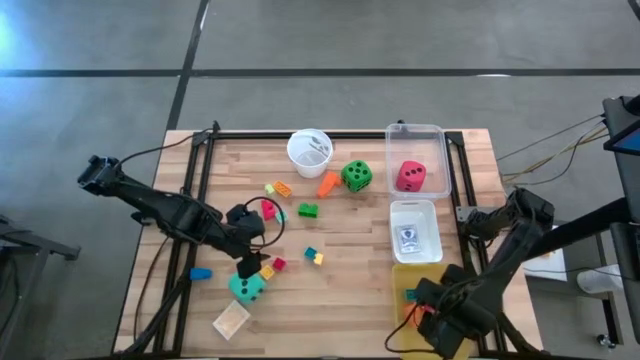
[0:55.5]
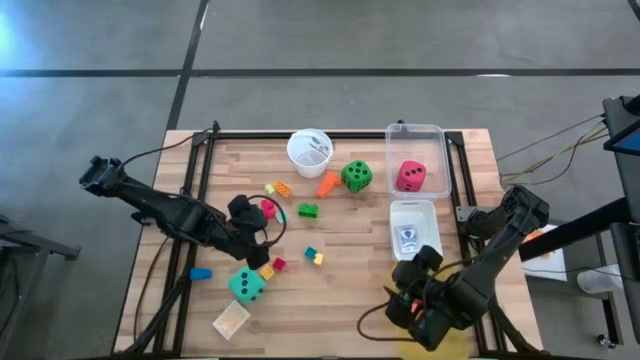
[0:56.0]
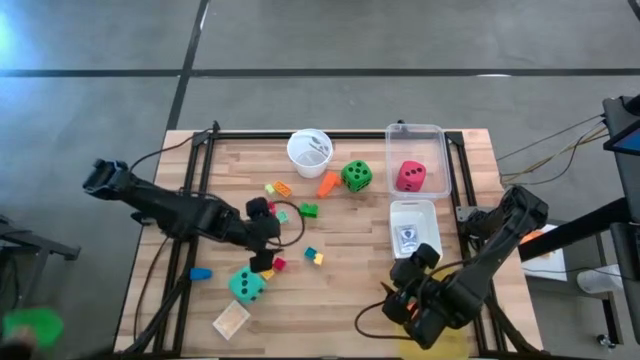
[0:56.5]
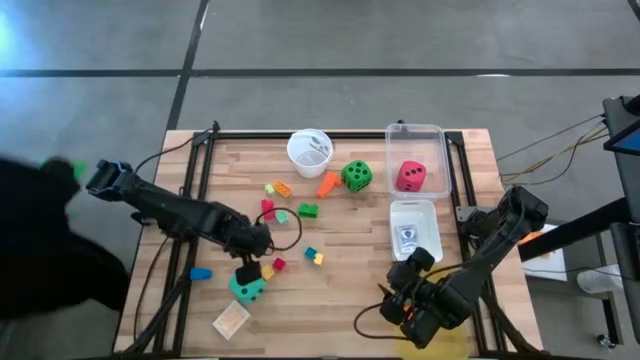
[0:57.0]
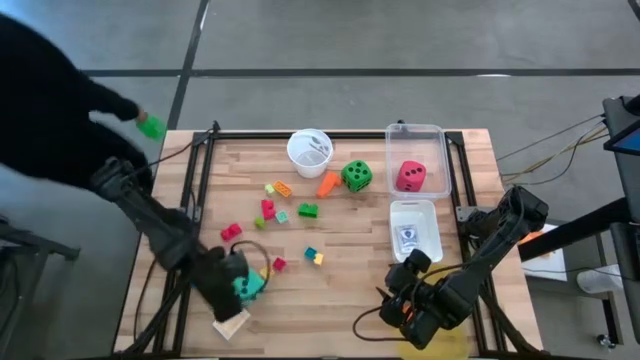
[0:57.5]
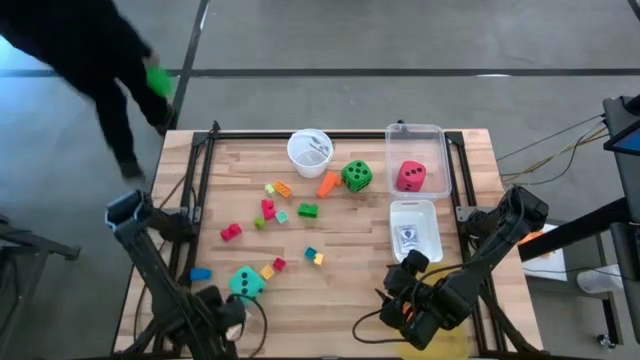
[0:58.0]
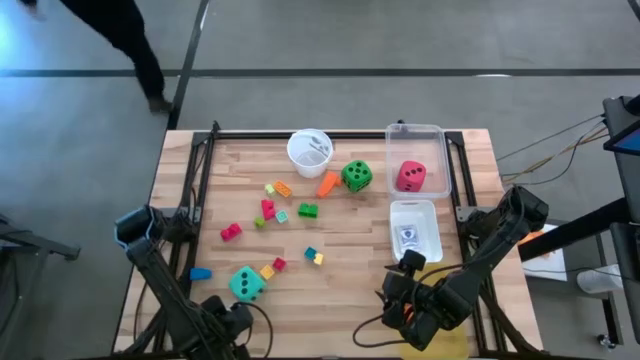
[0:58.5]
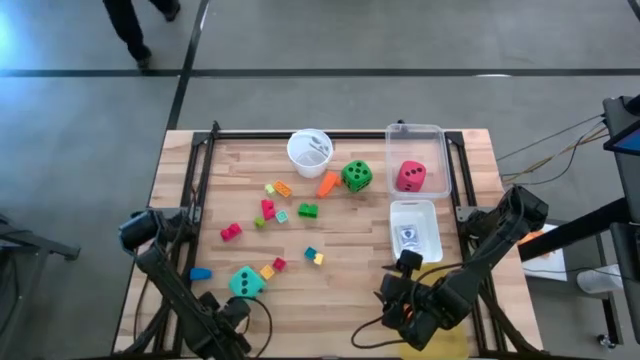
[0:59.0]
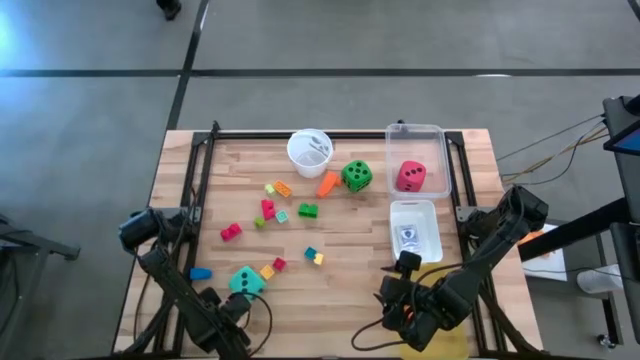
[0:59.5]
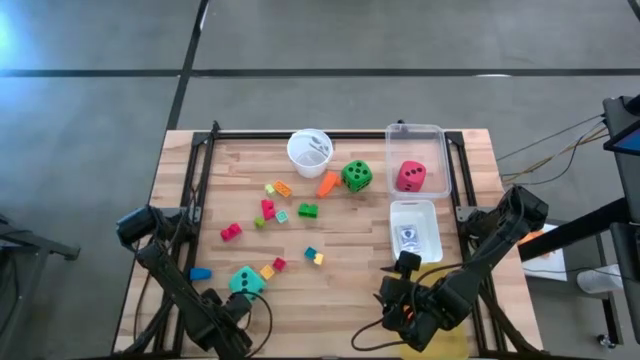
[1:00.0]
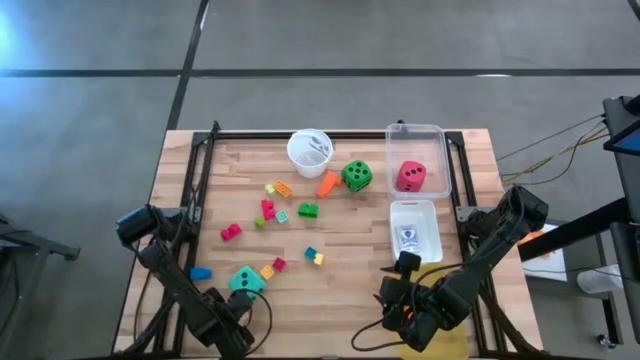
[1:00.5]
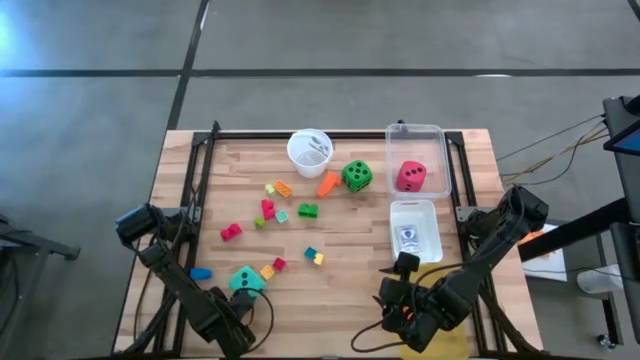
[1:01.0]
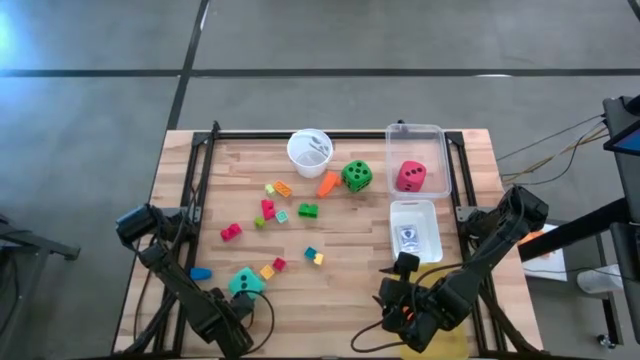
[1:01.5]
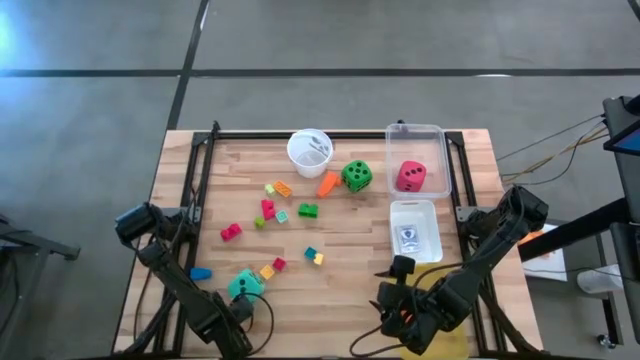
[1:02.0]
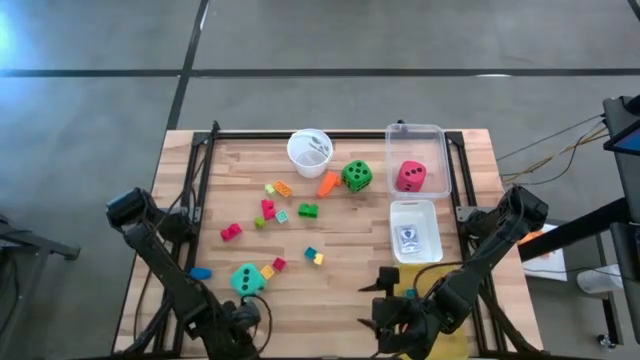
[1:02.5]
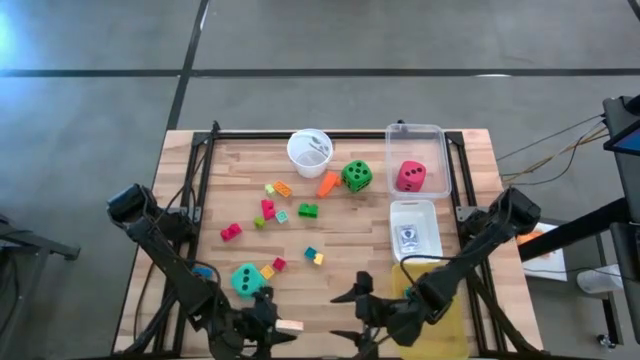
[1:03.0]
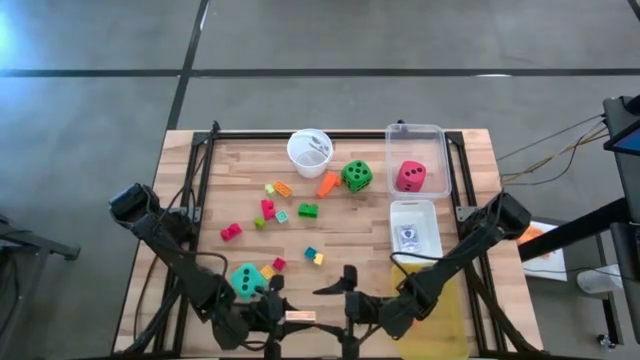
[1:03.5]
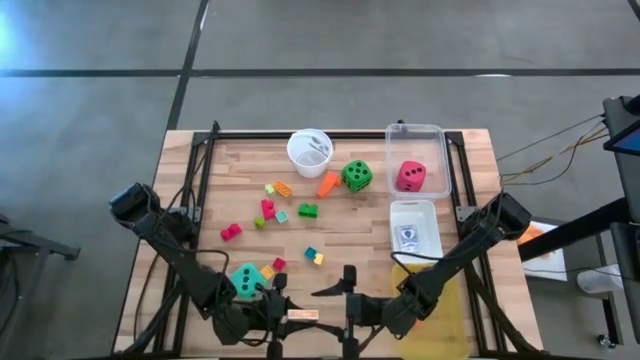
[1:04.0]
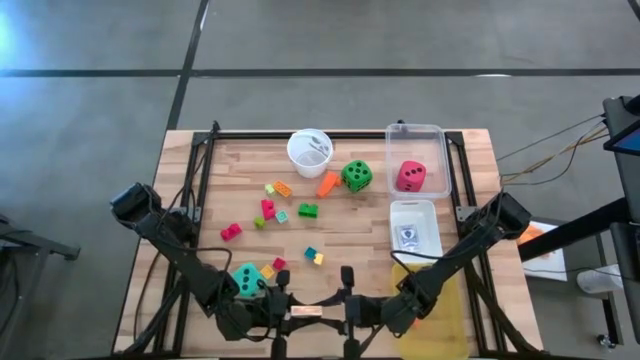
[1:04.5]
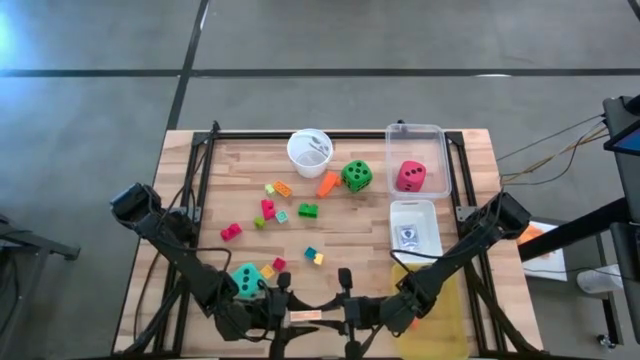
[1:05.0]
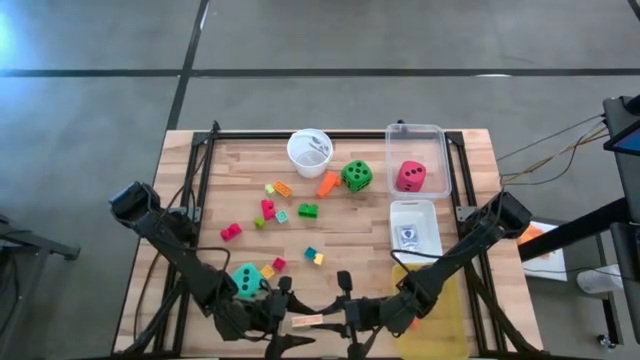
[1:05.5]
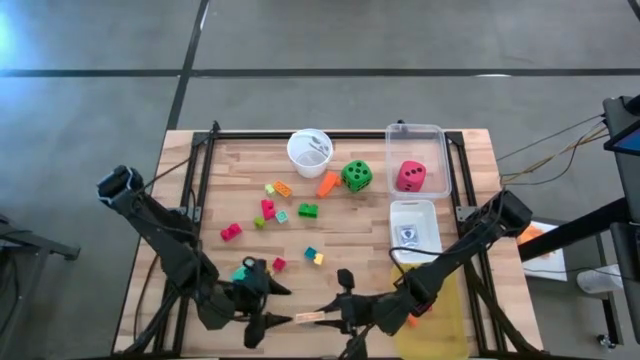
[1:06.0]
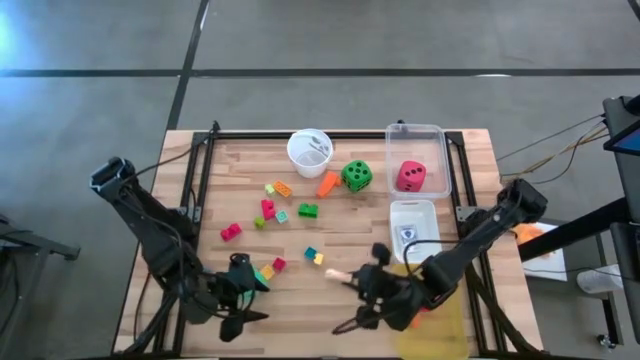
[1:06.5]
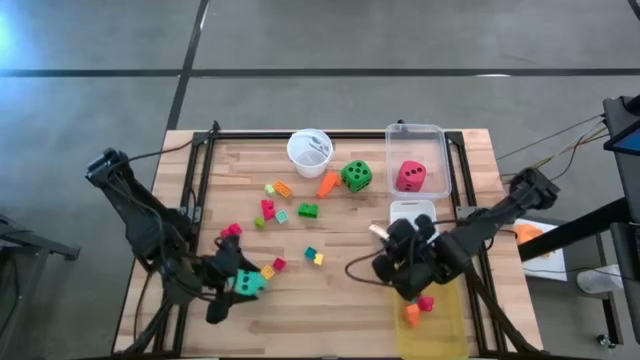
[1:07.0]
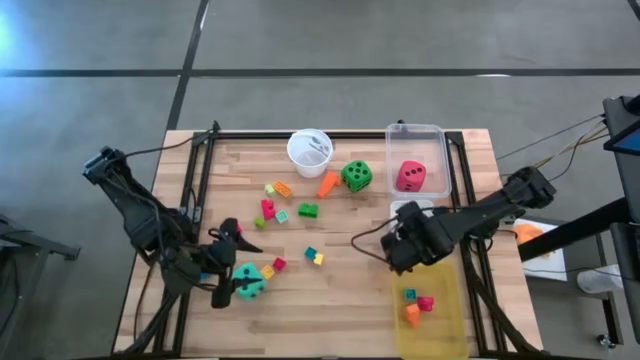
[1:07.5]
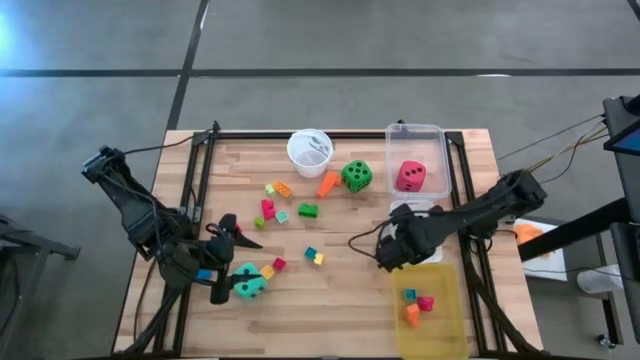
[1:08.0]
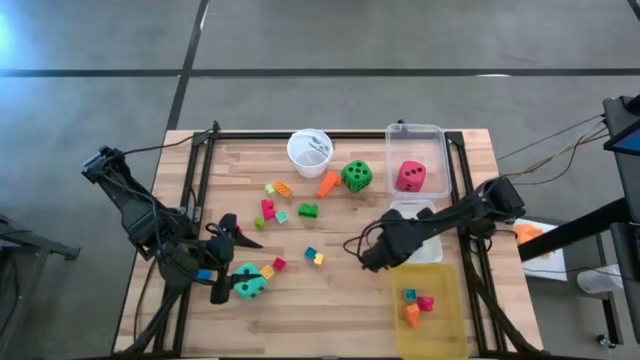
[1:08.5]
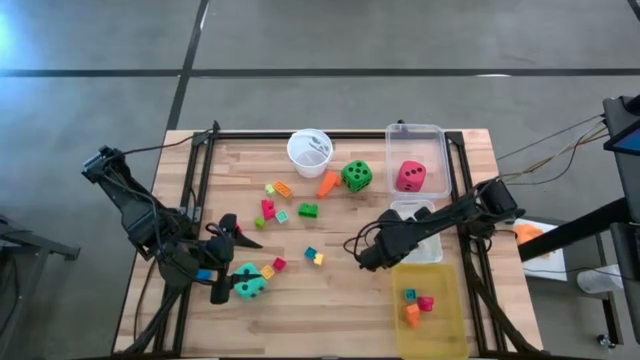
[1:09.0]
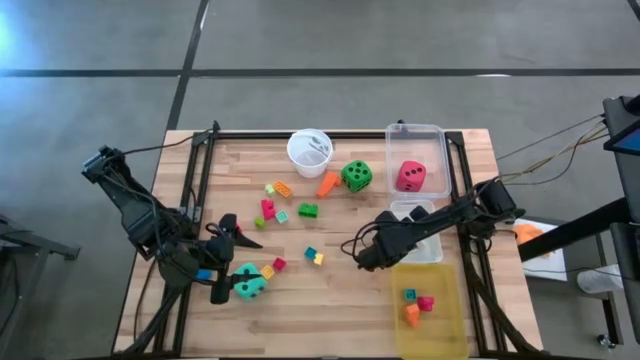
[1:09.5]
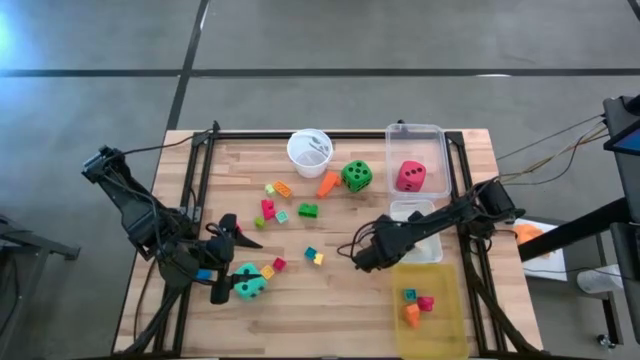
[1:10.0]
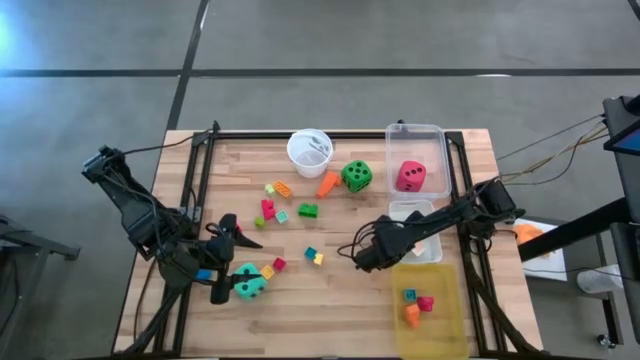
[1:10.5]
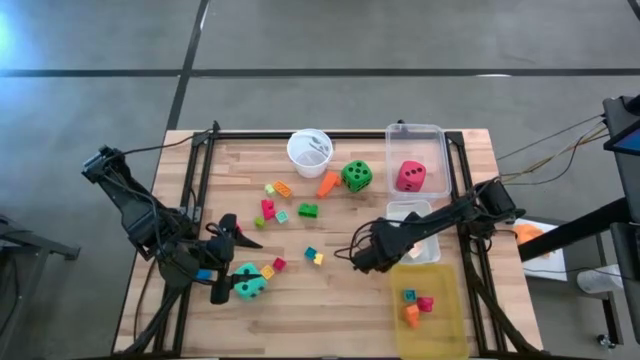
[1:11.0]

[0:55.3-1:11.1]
Task: Pick & Place Toys
Put the yellow deck of cards into the white bin

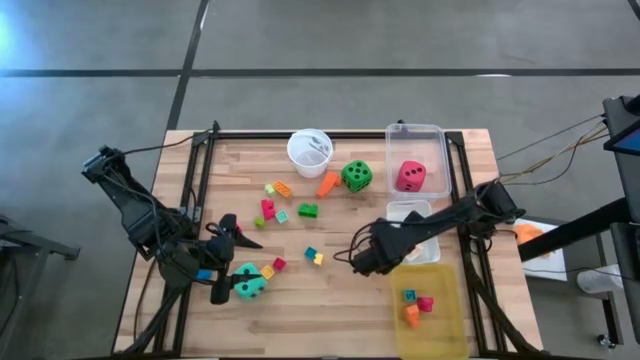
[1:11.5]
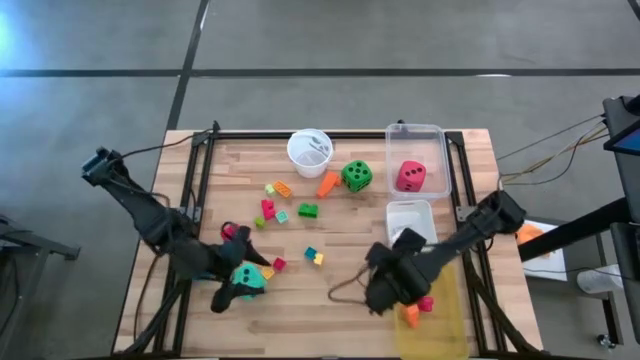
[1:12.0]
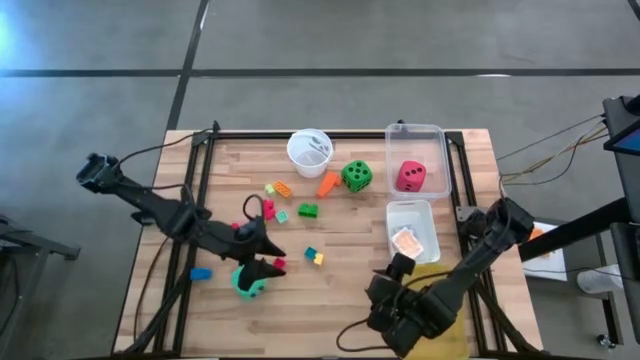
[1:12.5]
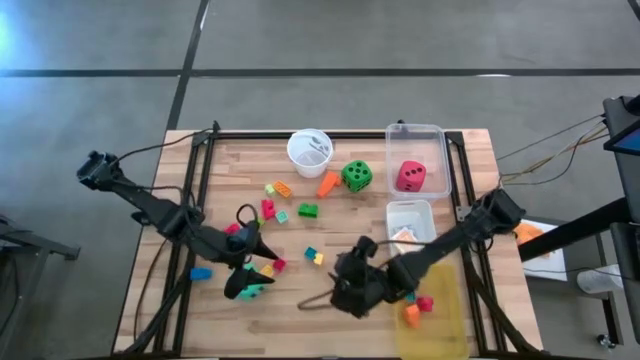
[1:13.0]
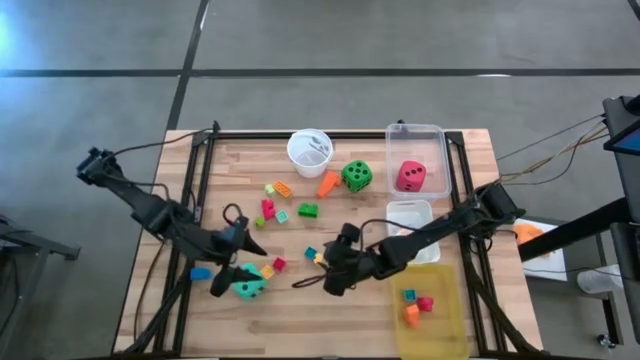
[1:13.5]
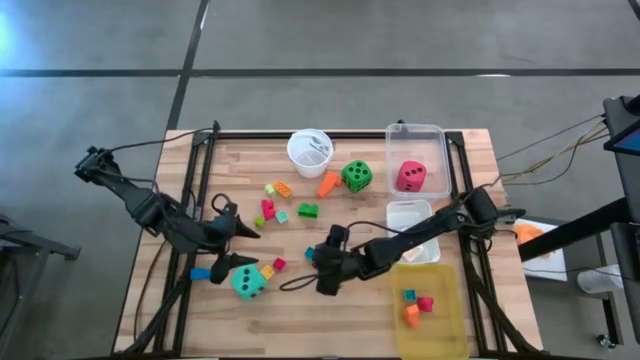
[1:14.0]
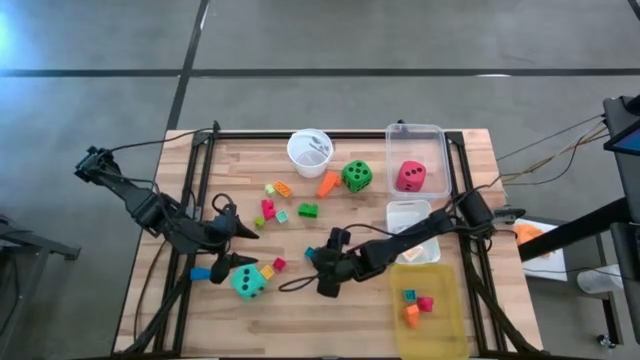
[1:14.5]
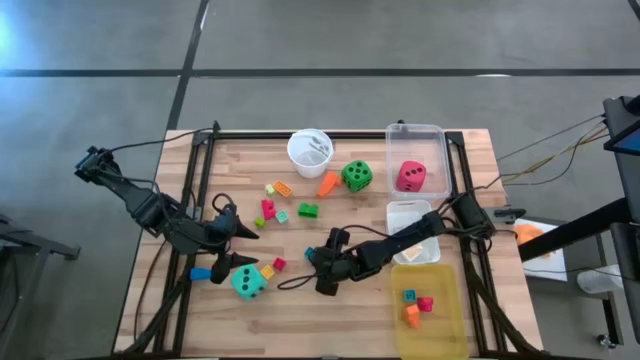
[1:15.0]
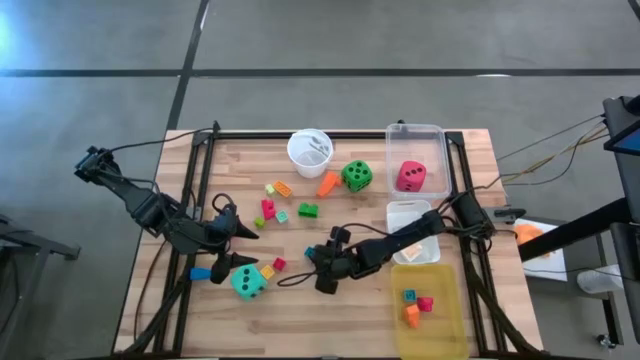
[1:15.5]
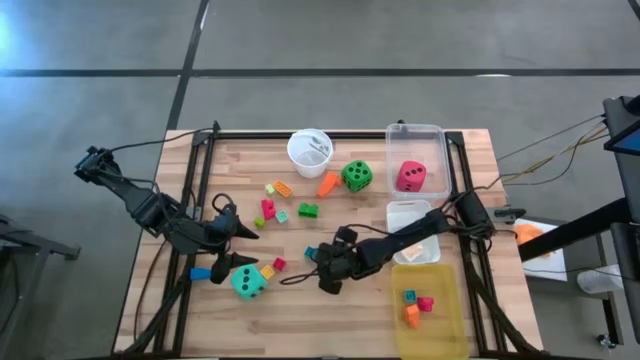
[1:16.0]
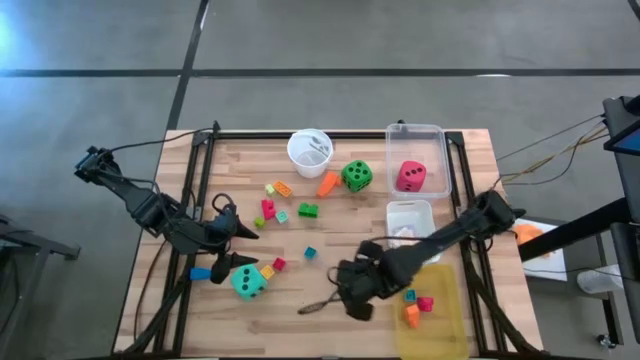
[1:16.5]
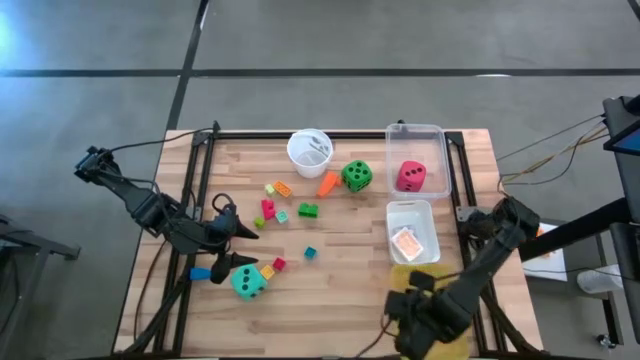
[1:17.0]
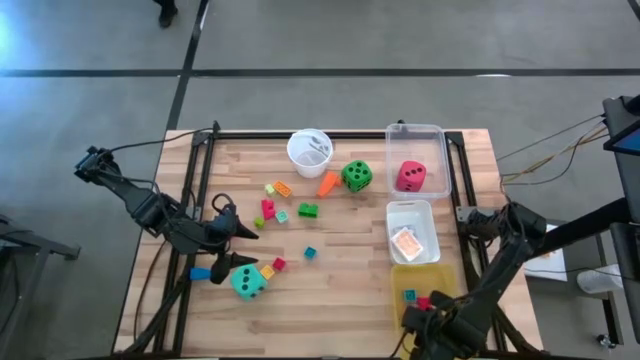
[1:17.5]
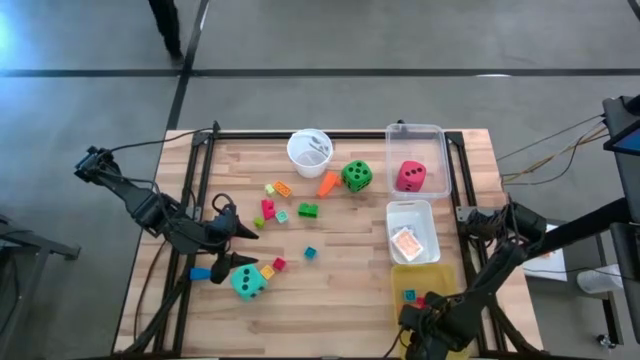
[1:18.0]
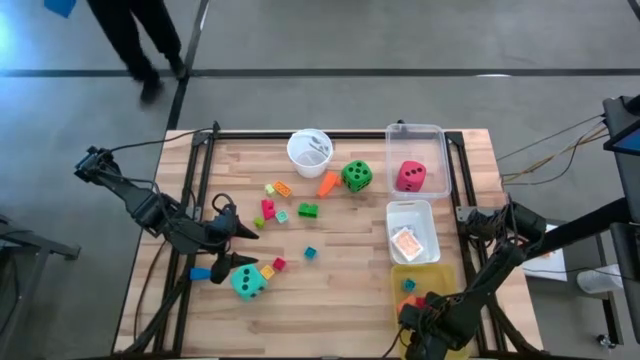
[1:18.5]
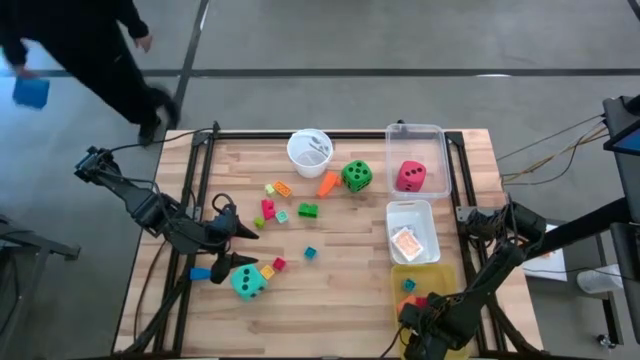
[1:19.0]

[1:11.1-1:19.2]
Put the yellow game piece into the yellow bin
